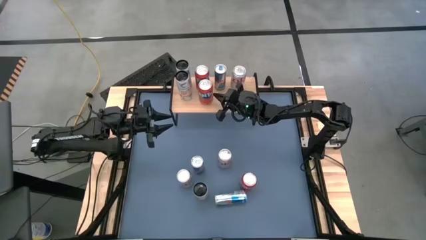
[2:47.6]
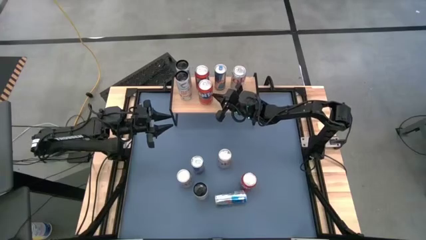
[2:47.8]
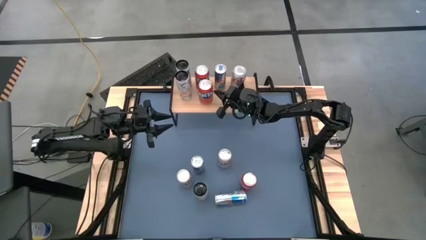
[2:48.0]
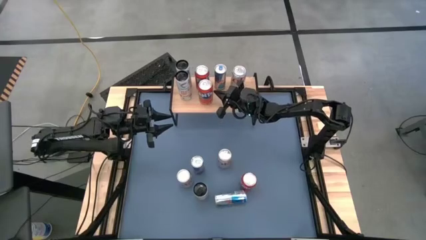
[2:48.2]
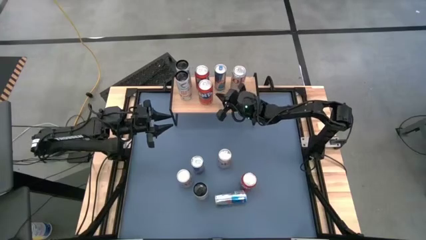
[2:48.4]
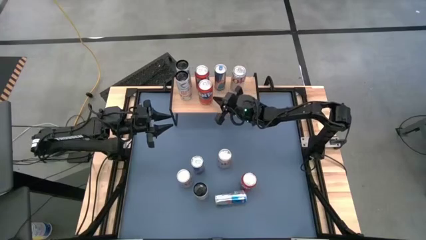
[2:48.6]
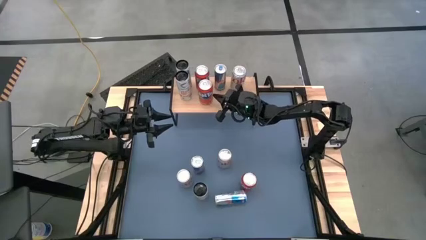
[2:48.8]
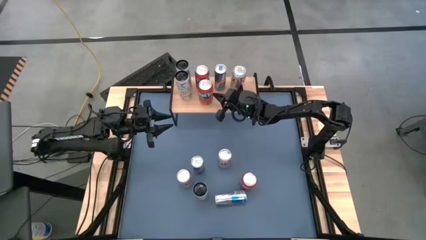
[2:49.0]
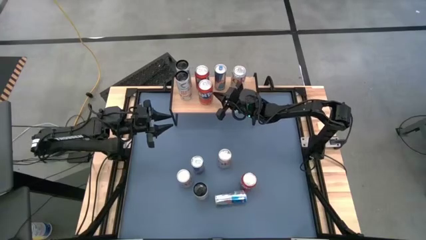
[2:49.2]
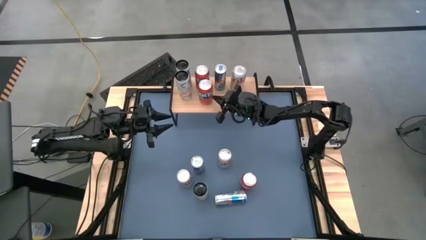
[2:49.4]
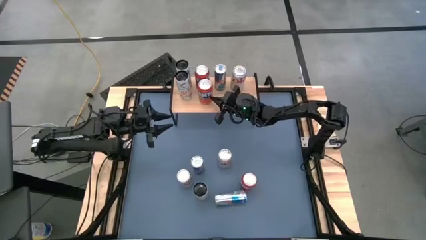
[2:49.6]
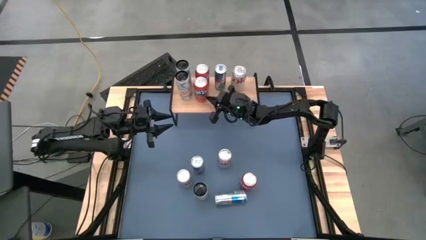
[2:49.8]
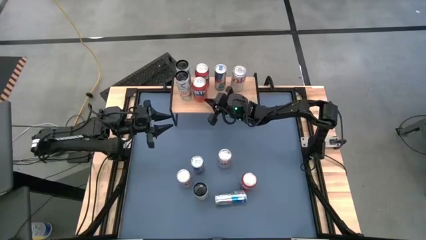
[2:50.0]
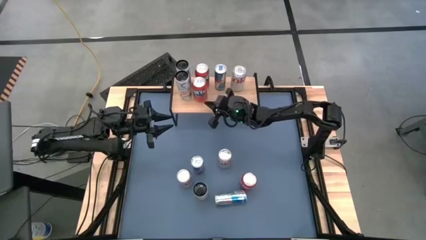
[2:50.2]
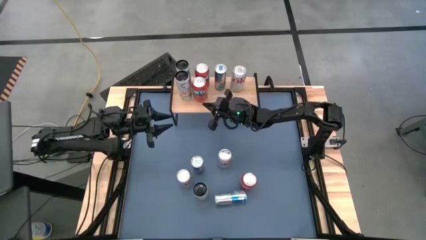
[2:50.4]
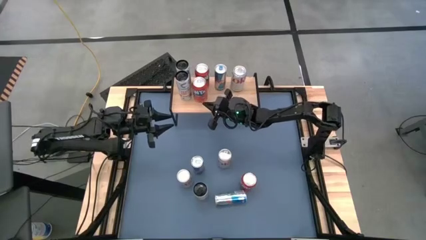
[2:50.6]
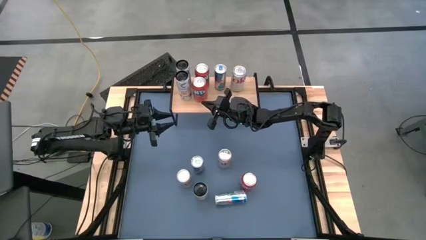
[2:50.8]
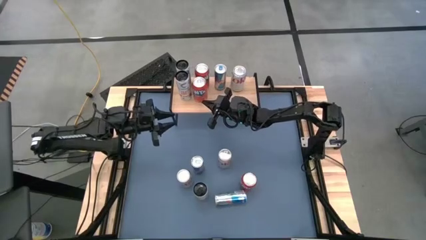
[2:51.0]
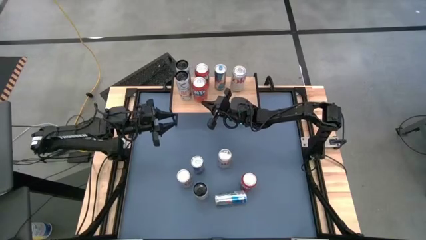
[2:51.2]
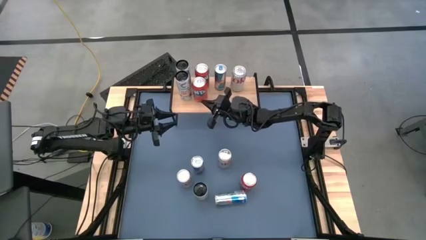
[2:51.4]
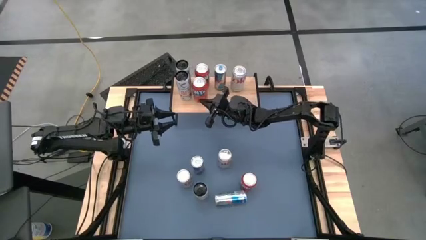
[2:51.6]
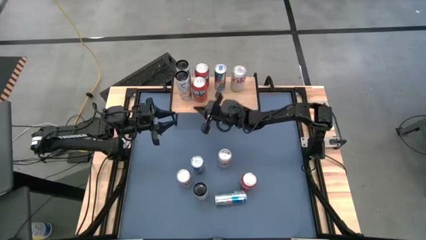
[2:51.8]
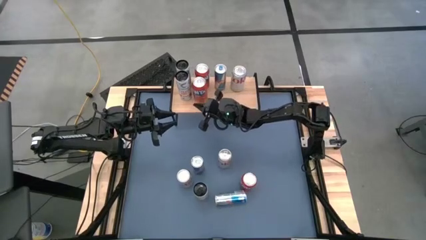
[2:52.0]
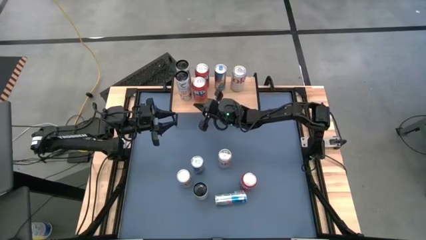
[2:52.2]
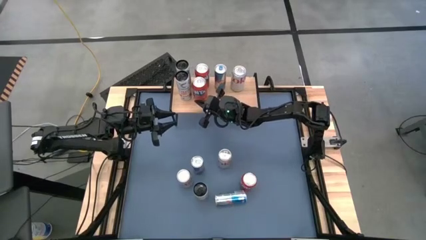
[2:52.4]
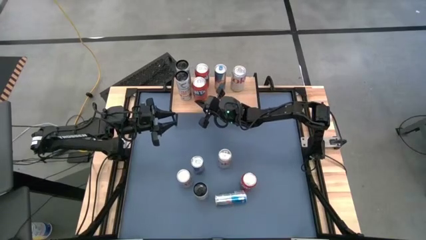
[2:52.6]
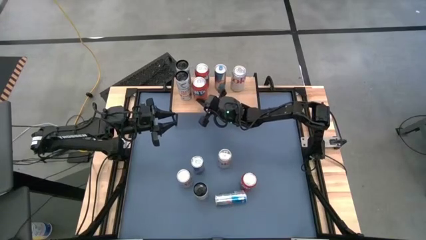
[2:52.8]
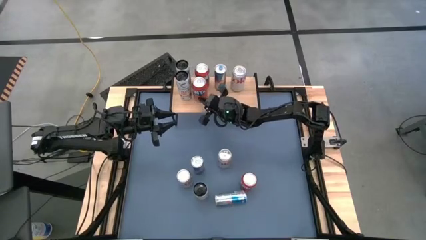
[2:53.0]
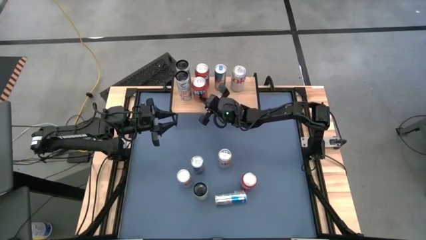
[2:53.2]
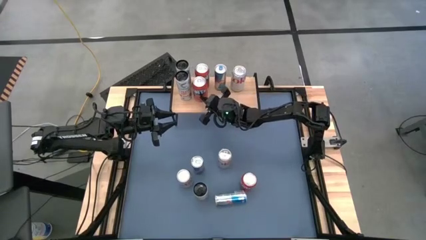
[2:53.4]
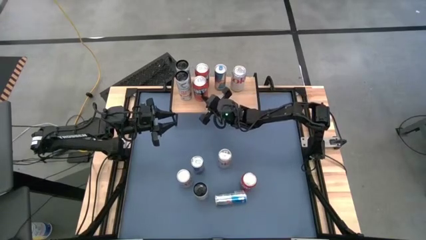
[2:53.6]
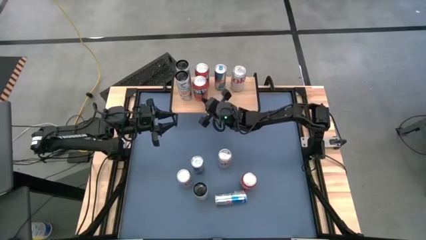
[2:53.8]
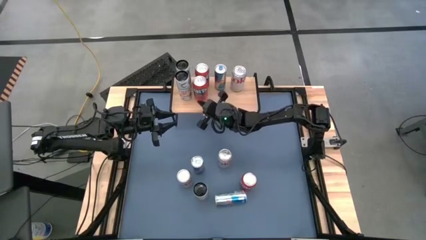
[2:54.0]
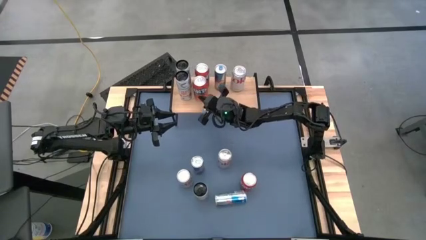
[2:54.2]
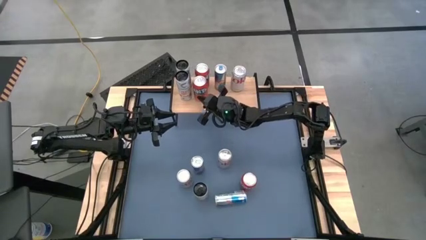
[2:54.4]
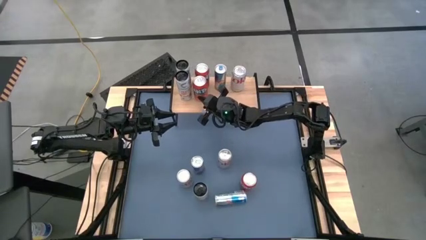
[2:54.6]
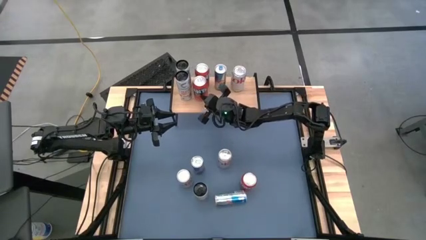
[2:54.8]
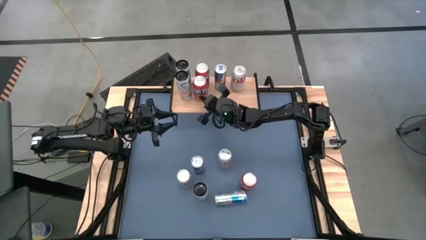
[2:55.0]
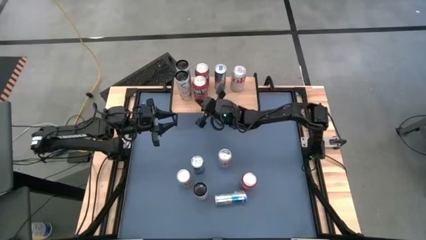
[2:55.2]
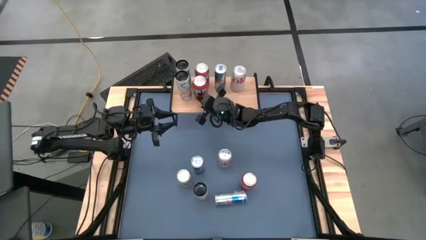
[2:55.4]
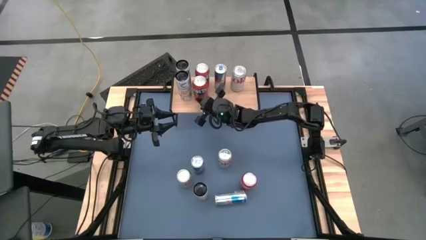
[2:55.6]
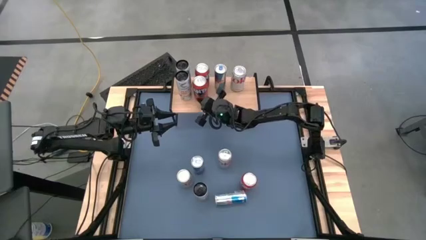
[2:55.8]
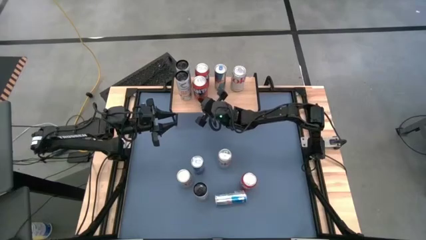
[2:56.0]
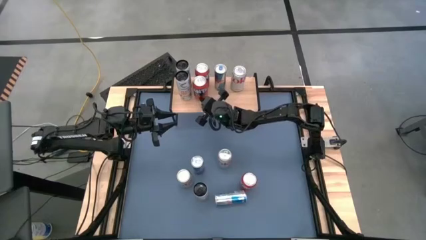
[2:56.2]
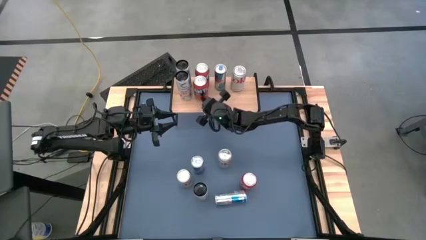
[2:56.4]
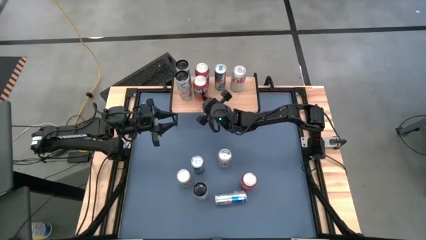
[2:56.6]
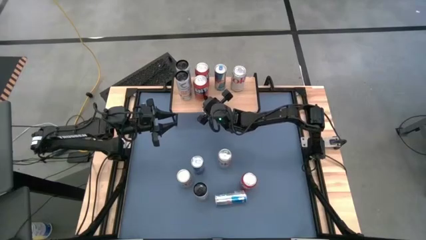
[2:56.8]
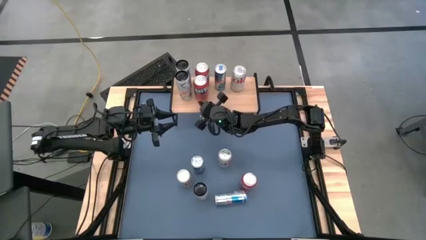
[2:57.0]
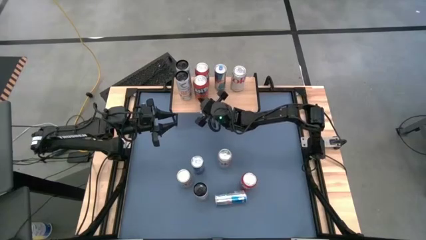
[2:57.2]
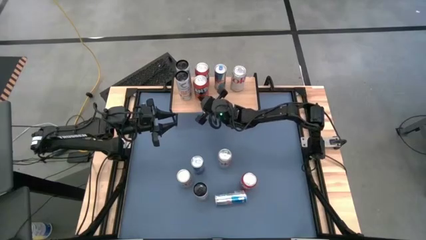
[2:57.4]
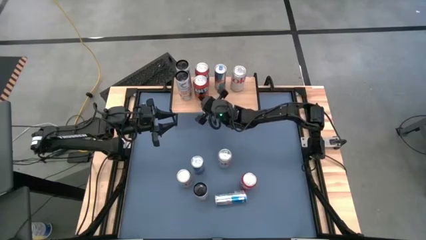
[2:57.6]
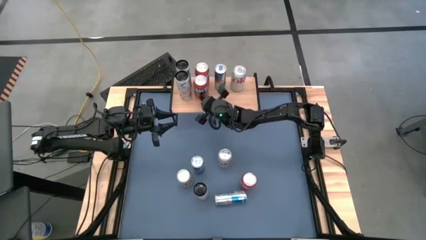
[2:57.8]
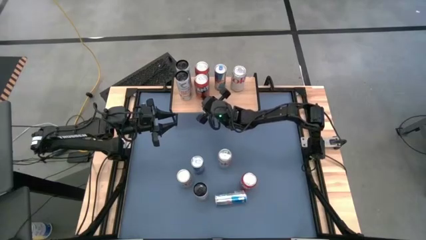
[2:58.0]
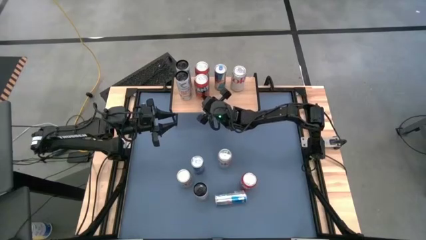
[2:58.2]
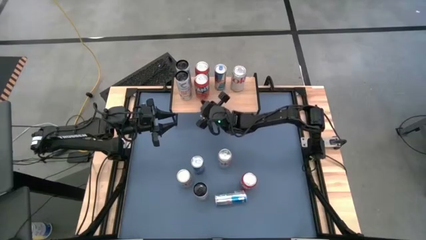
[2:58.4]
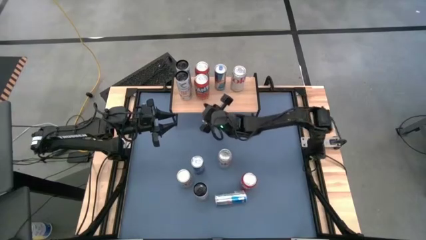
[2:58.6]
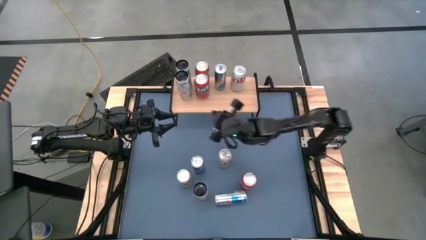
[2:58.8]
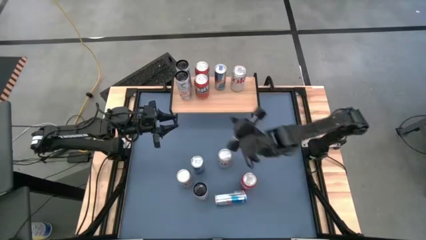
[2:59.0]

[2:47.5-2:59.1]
Task: Place canned beverage on shelf
Adjust the orange soda can

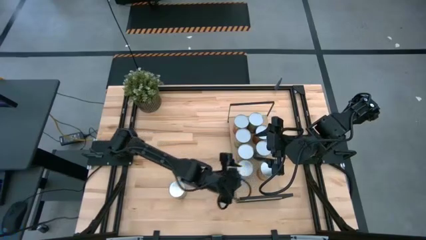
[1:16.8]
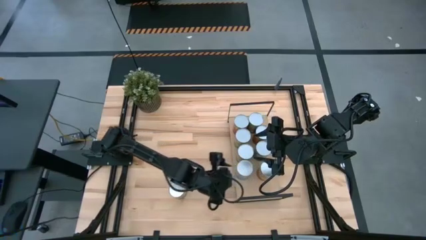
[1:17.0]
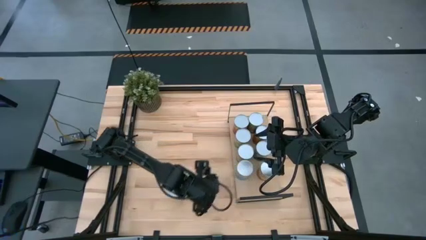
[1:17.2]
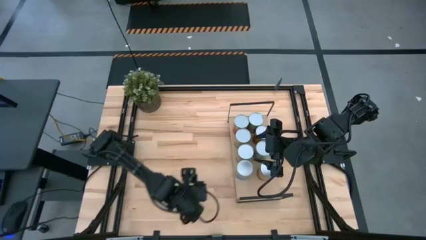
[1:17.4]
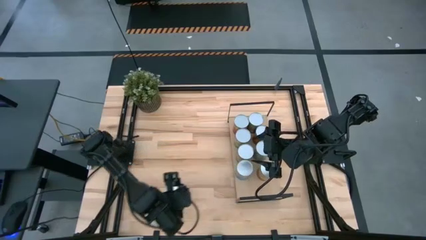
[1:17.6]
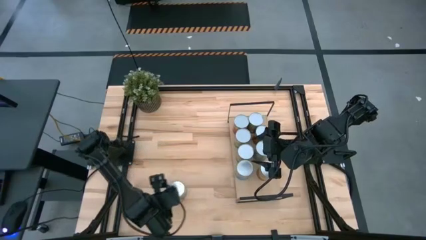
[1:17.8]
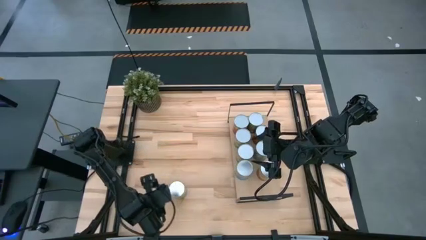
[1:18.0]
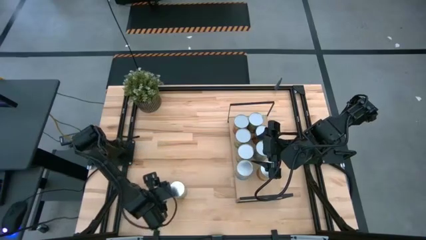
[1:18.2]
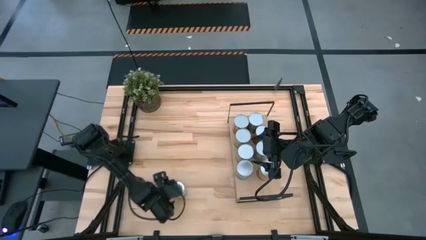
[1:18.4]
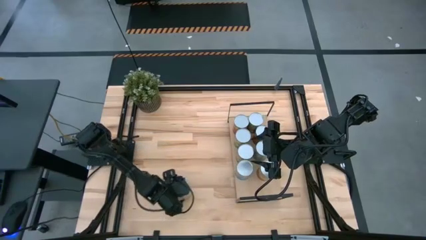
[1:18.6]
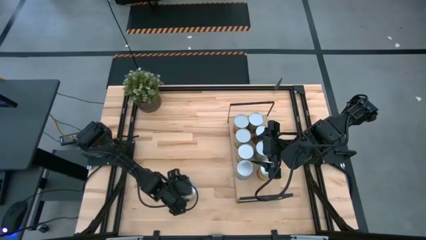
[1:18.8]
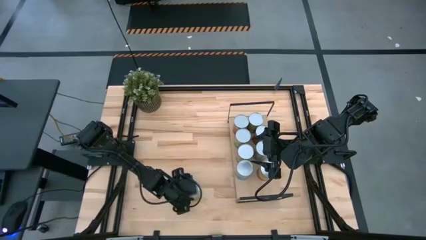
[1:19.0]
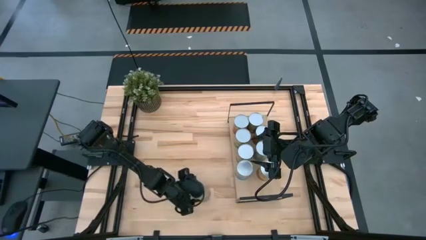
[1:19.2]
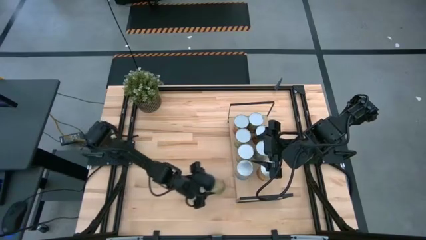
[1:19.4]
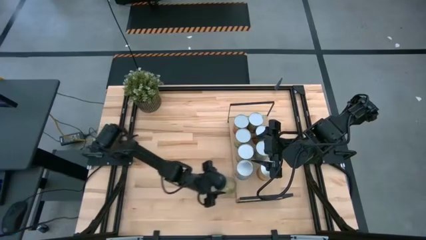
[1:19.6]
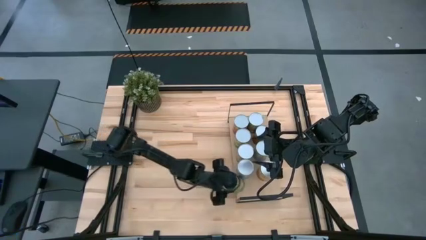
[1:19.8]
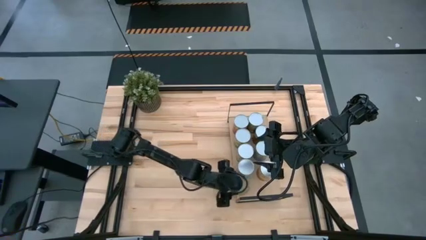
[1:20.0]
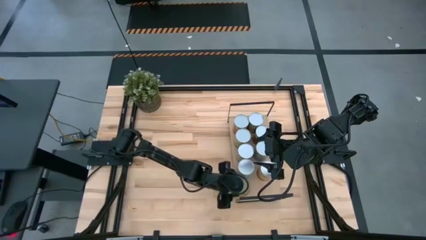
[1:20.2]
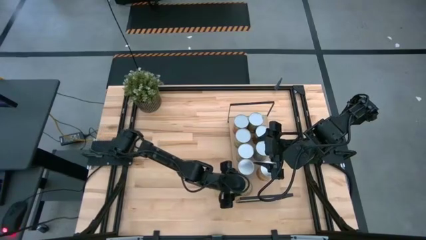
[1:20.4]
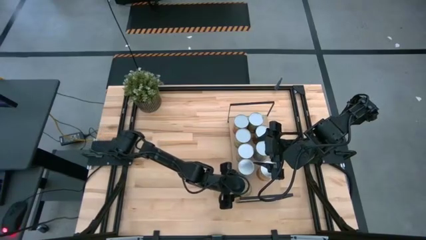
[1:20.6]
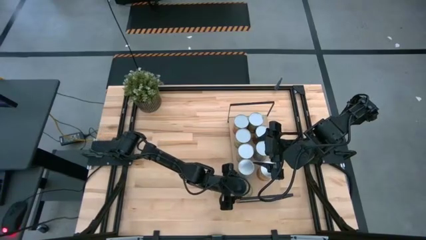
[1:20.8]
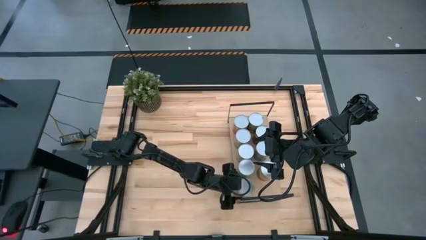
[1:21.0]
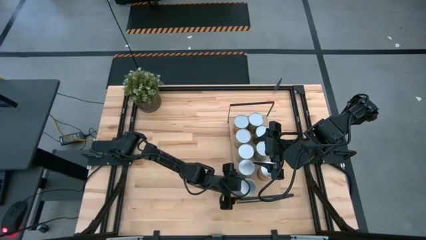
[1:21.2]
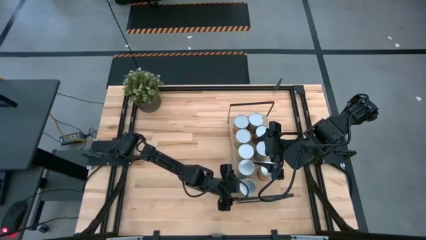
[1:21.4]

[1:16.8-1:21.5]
Task: Pick and place cans onto a shelf
Put the canned oranges on the shelf
